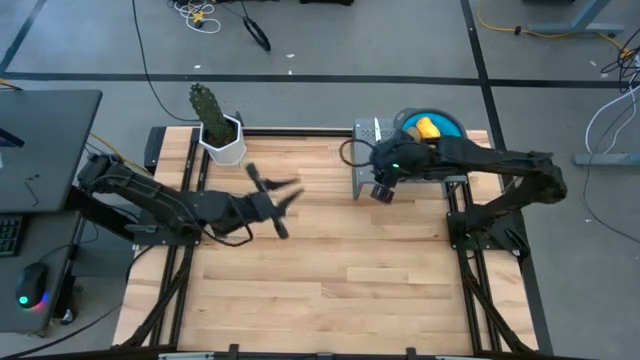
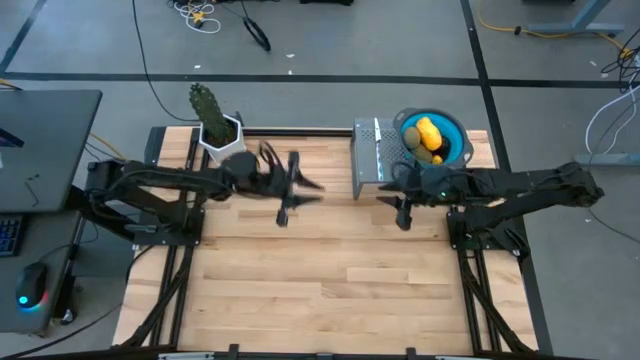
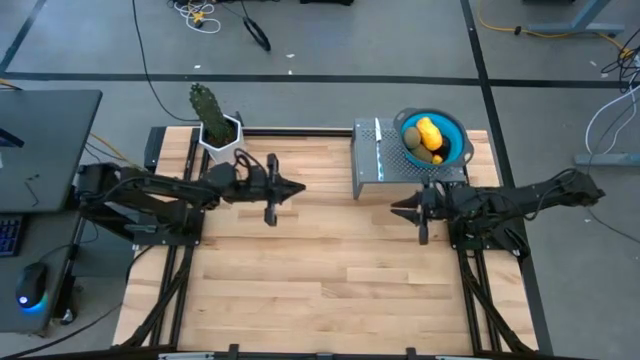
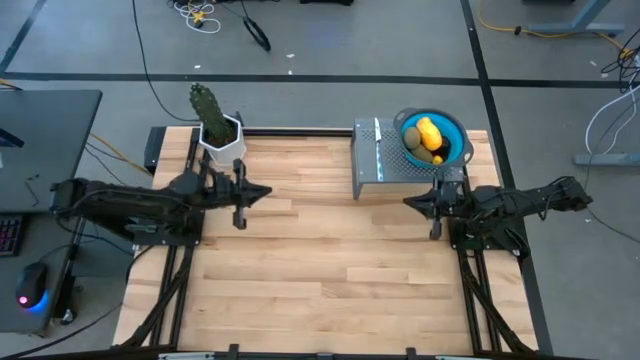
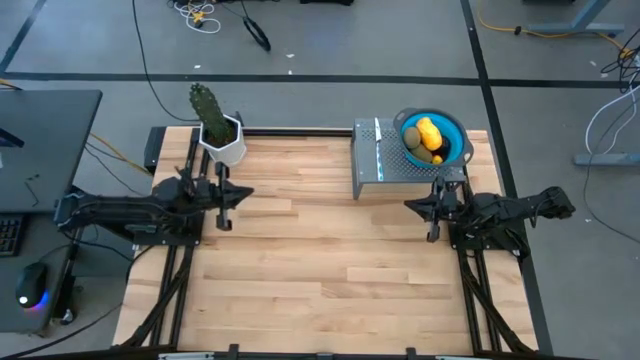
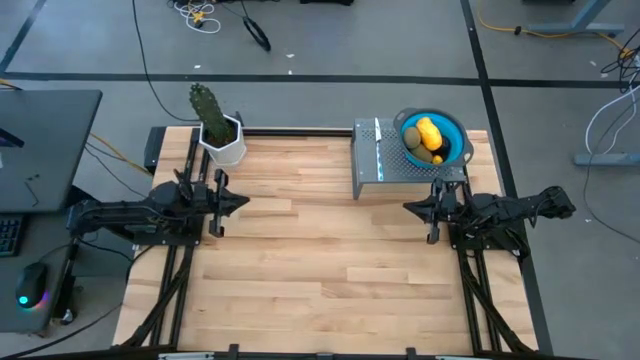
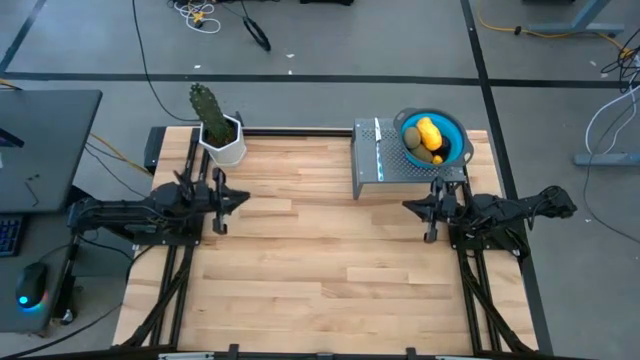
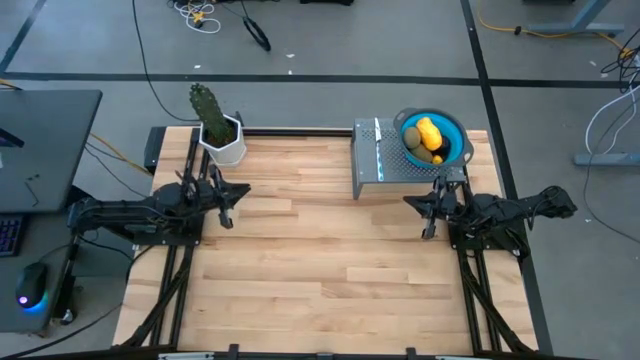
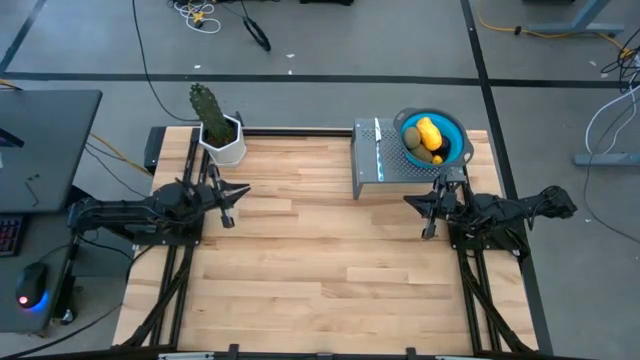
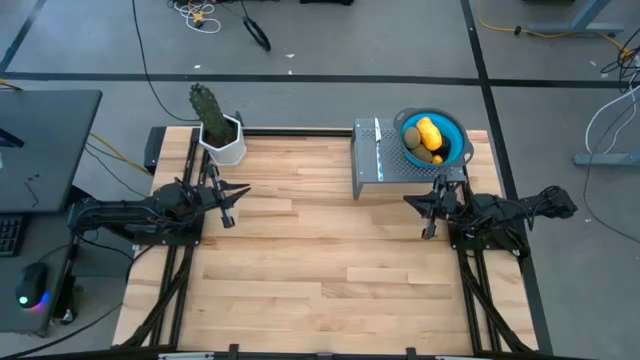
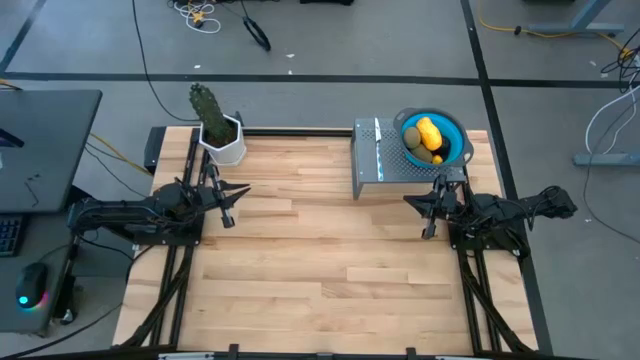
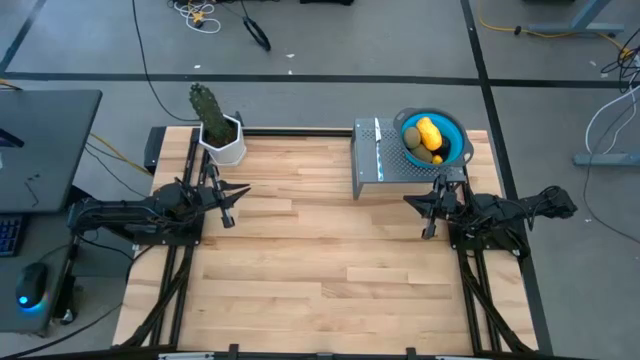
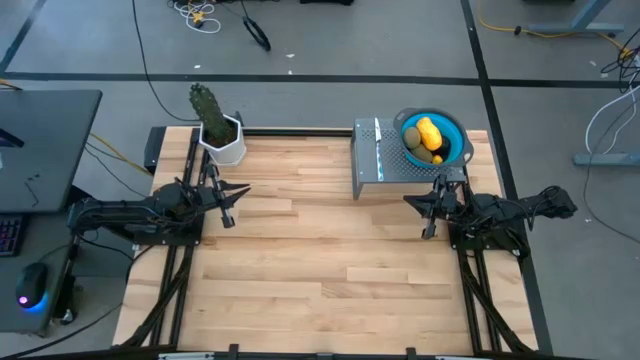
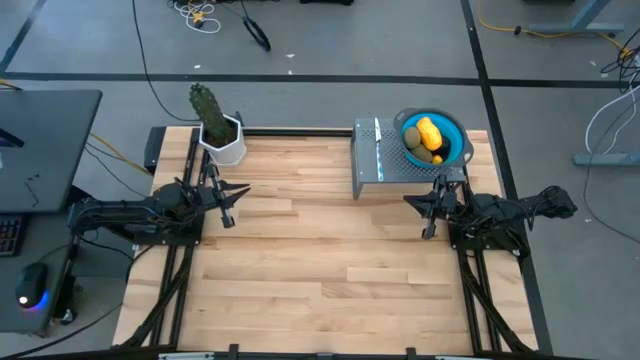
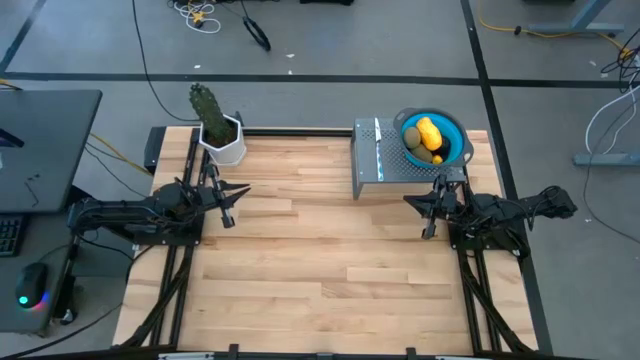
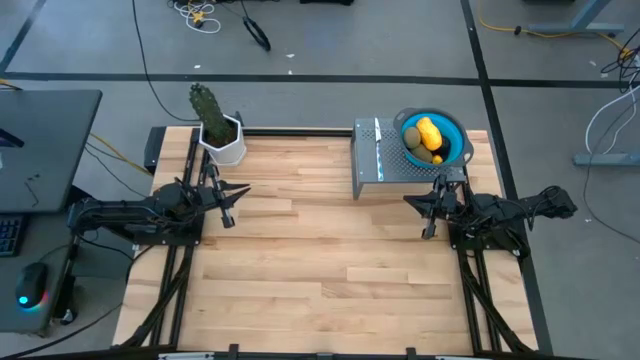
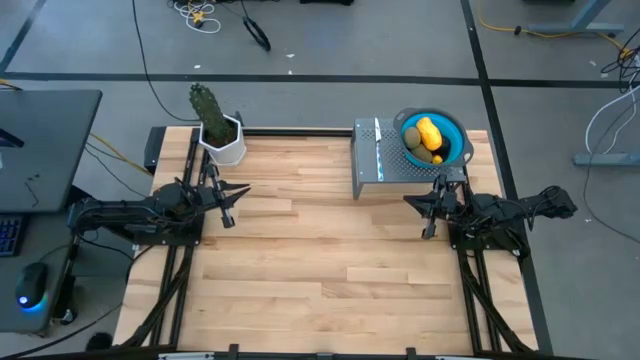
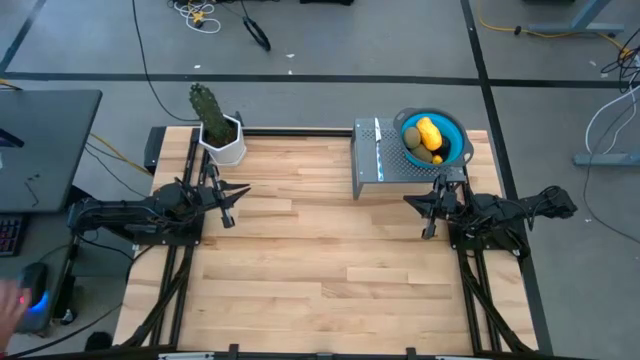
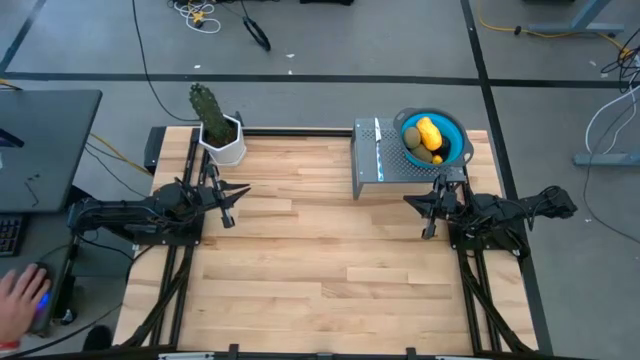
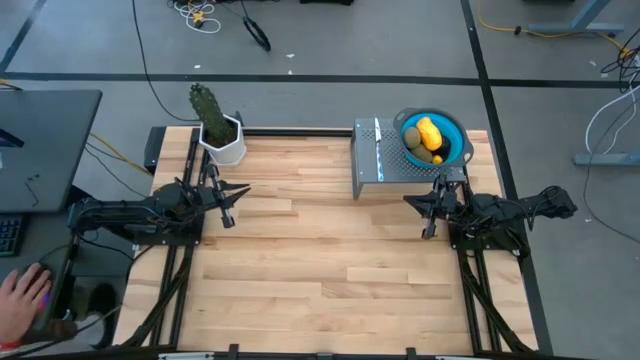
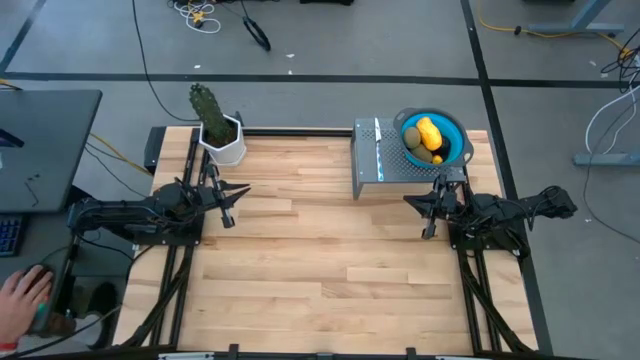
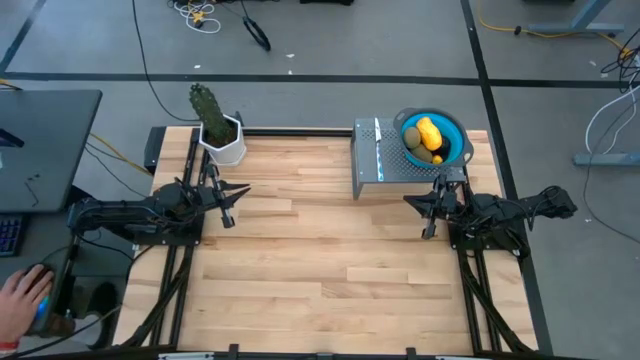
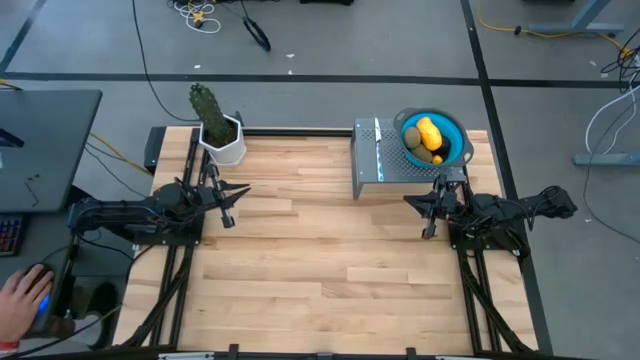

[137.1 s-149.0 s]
Task: Pick & Place Fruit
Return to Home Position

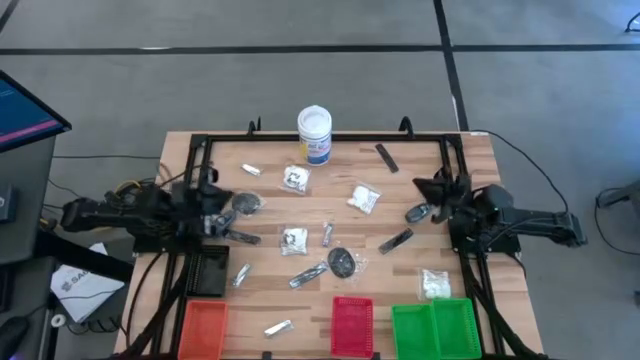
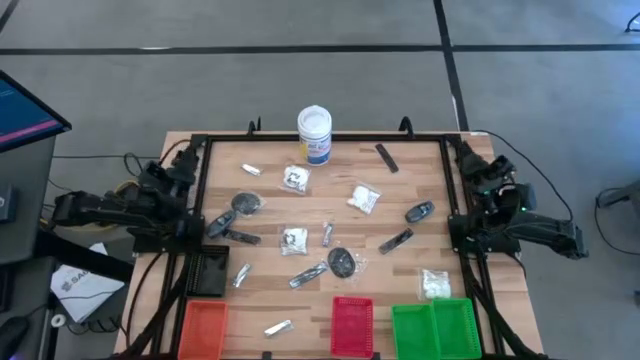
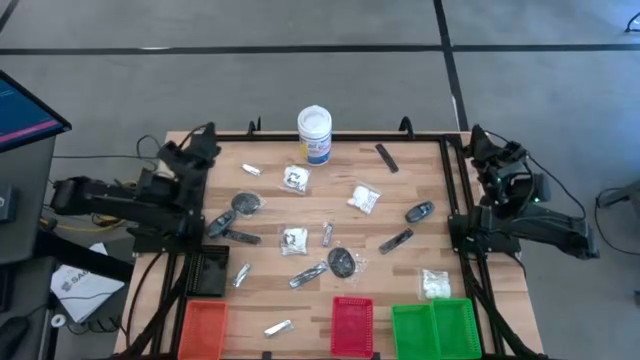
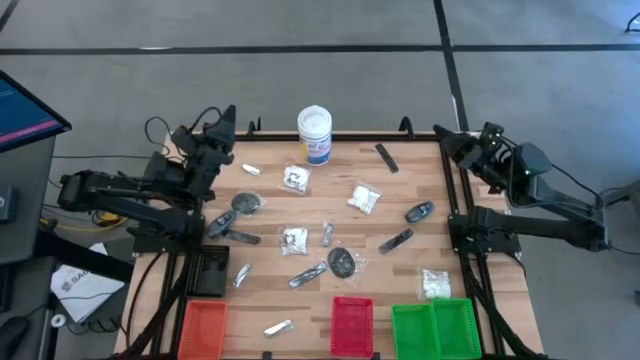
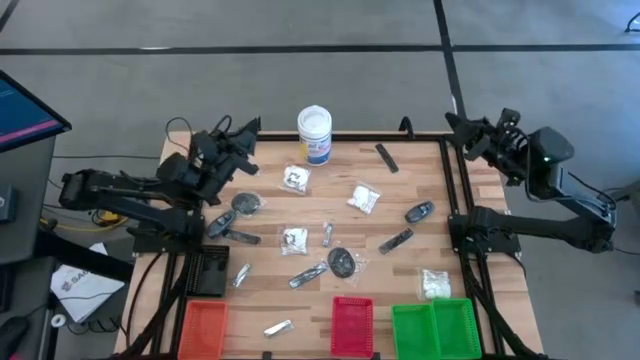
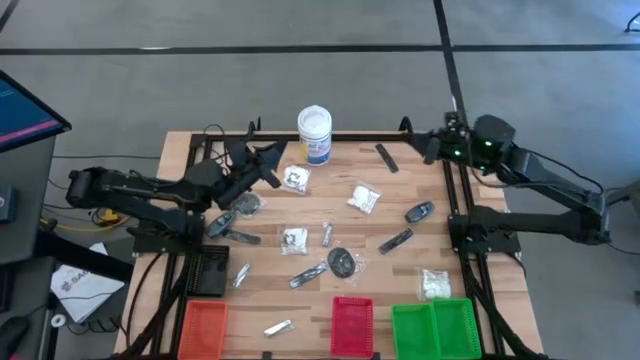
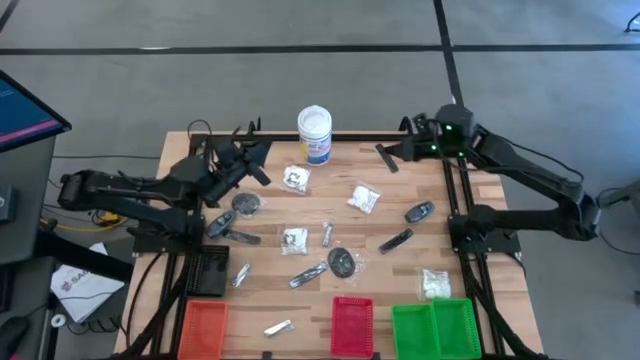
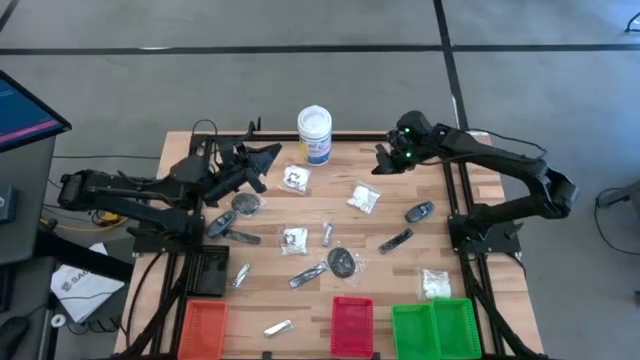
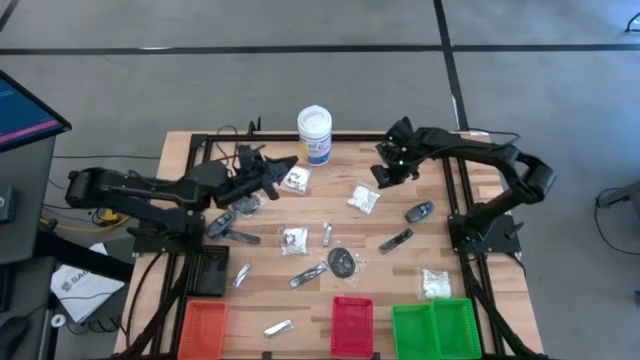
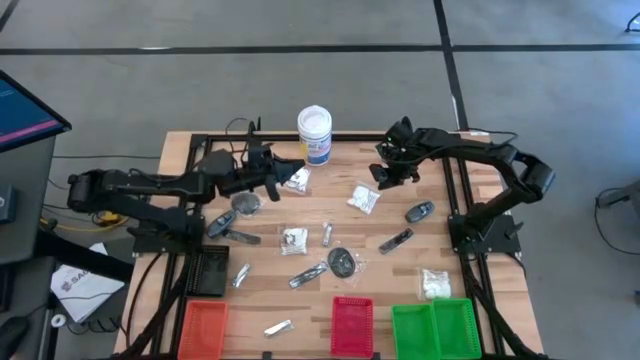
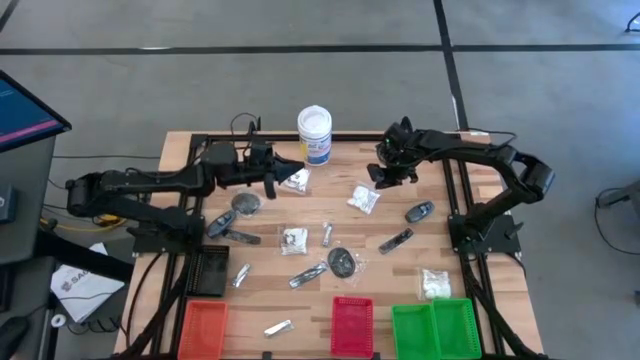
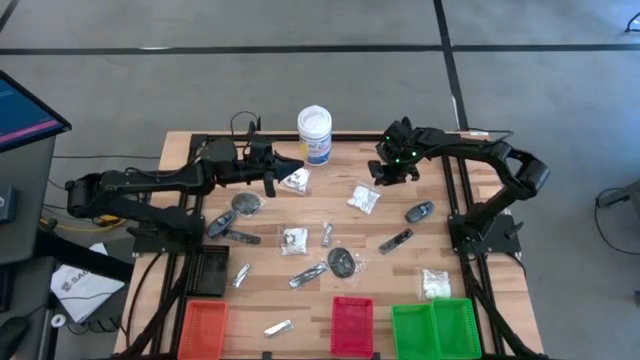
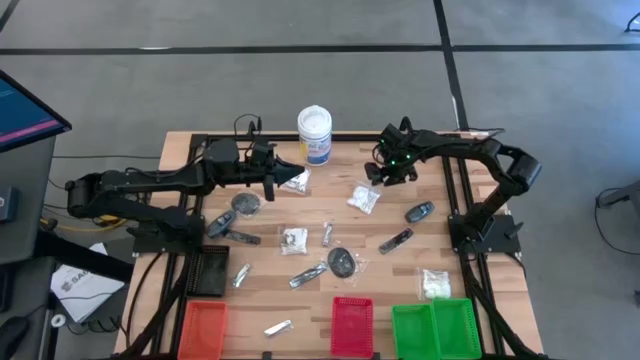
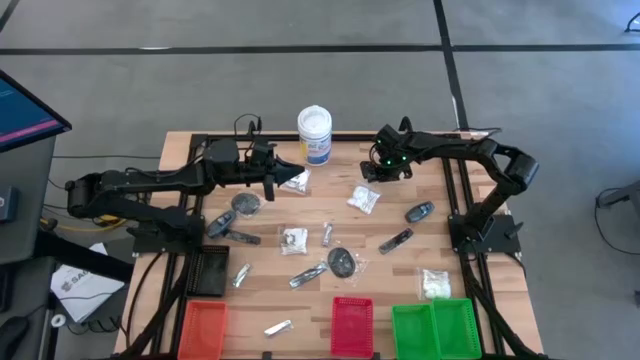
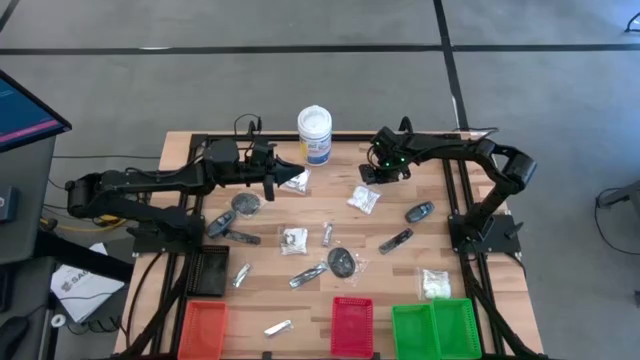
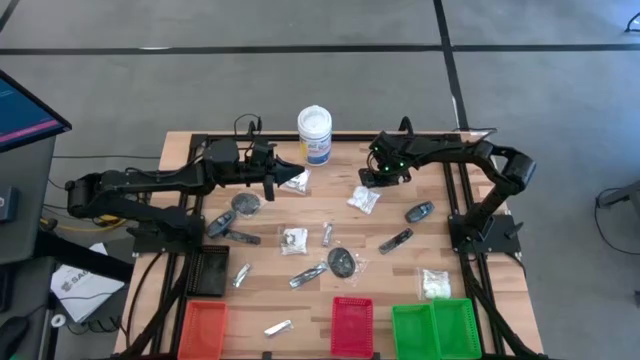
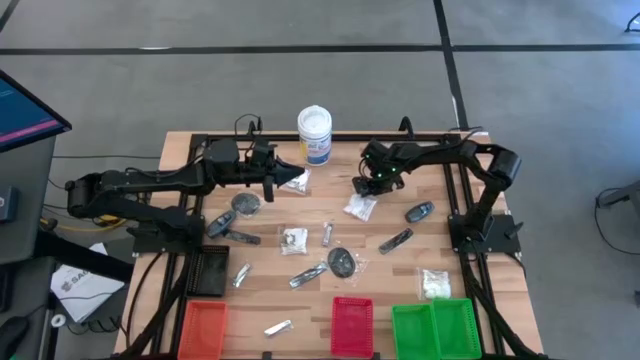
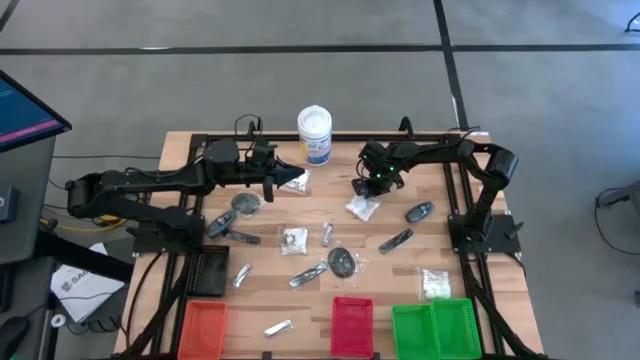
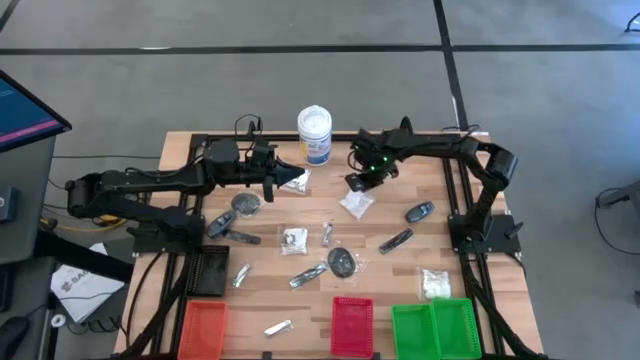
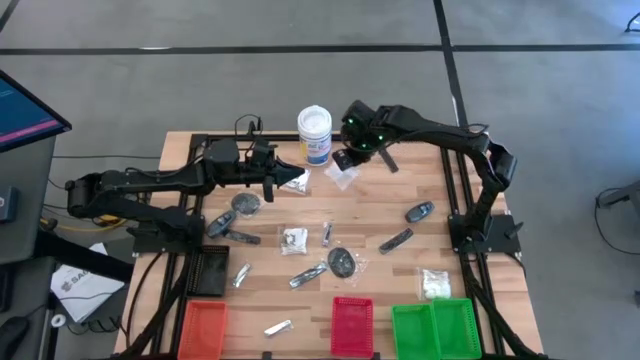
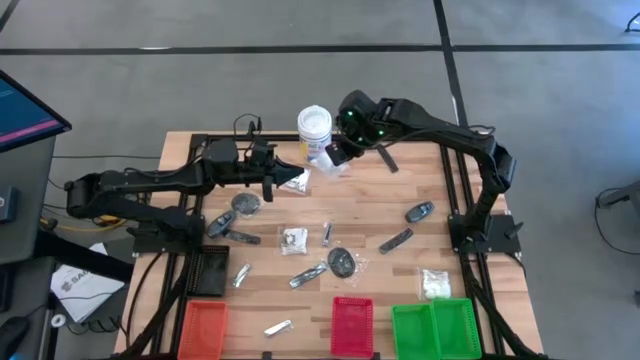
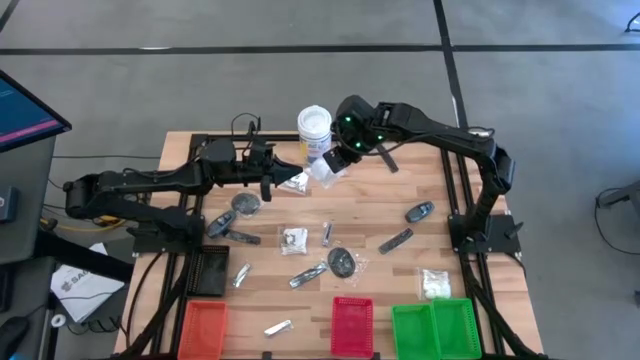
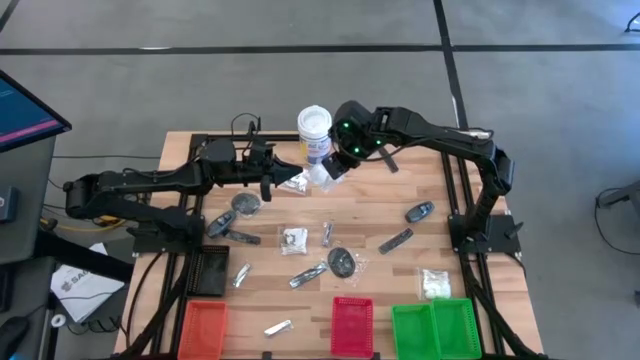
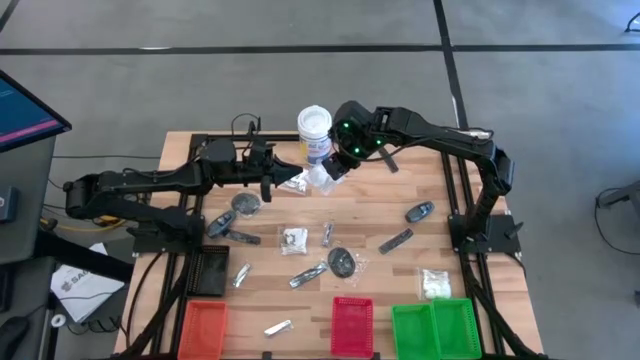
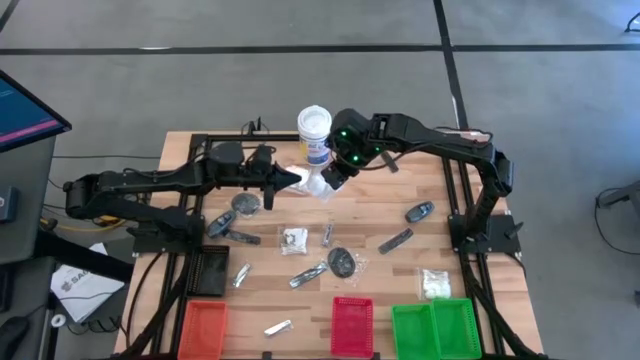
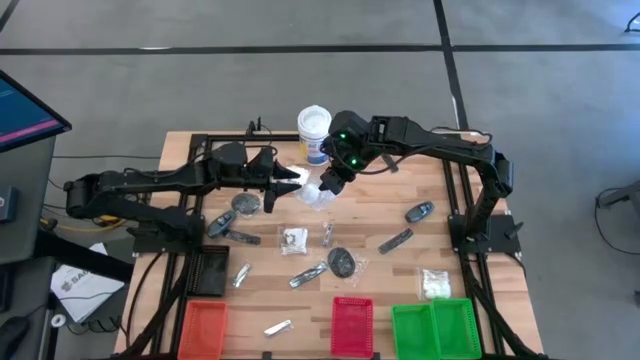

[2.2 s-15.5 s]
Task: Pick & Place Travel size toiletries
Put the white cotton pack into the right green bin
